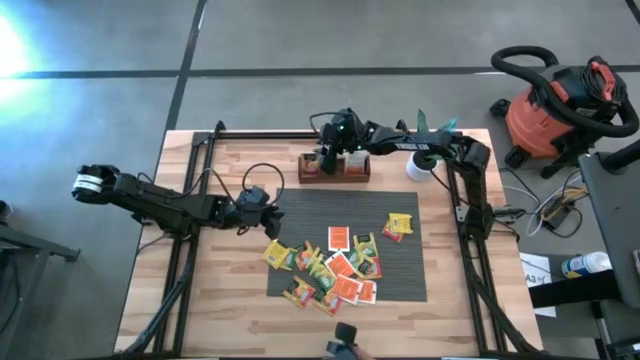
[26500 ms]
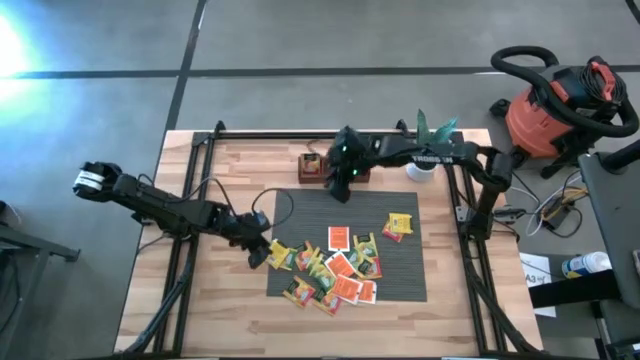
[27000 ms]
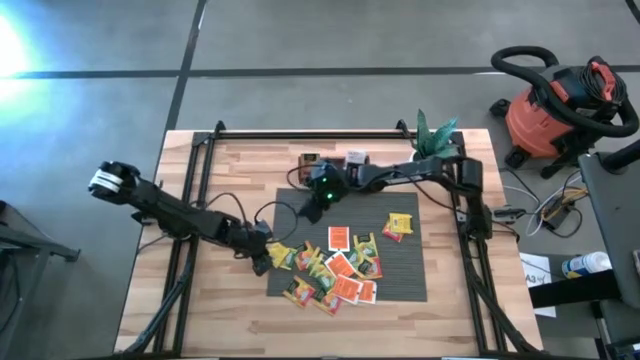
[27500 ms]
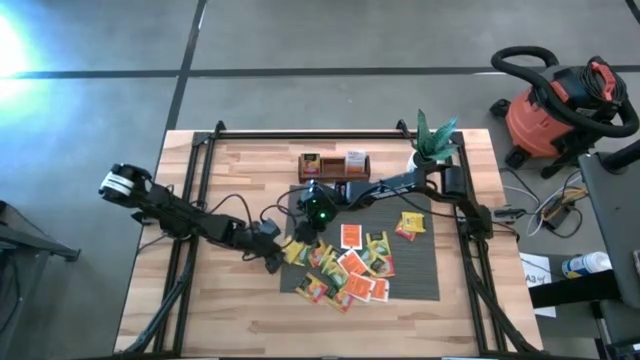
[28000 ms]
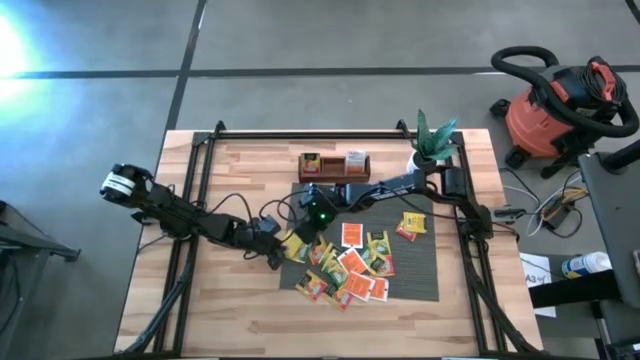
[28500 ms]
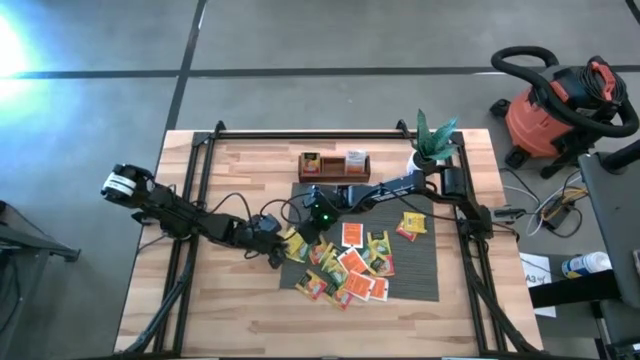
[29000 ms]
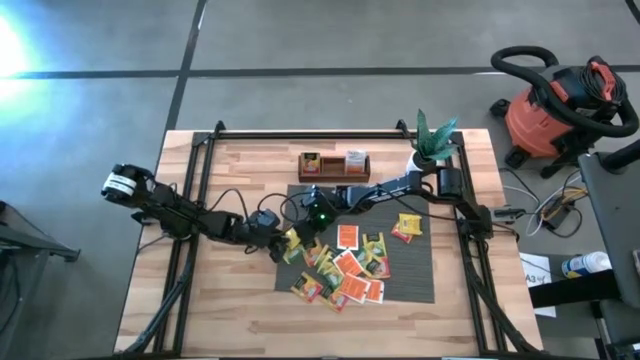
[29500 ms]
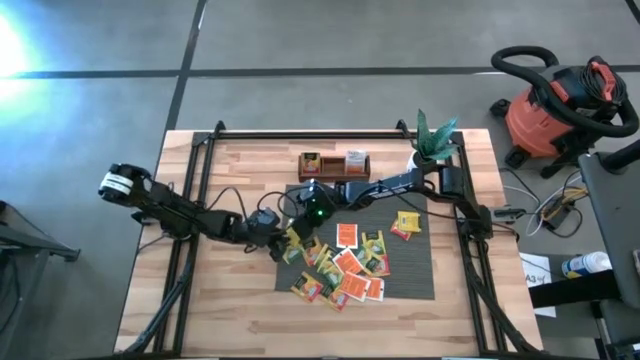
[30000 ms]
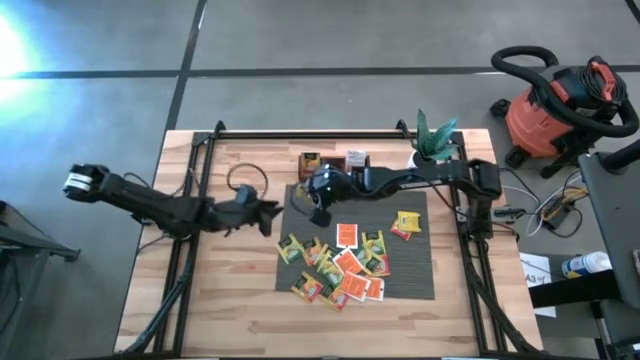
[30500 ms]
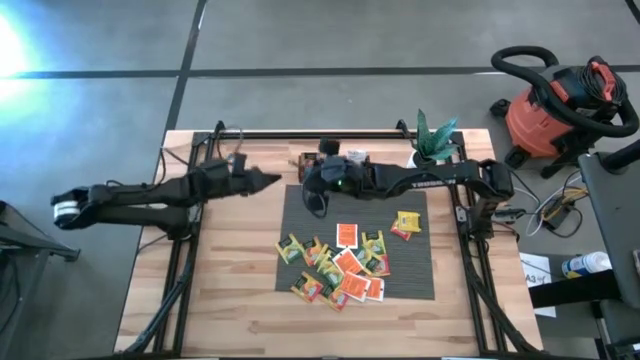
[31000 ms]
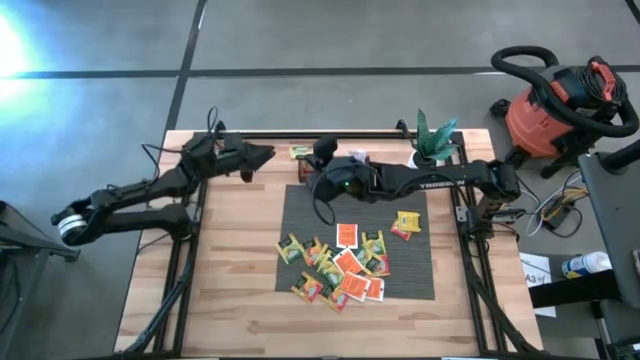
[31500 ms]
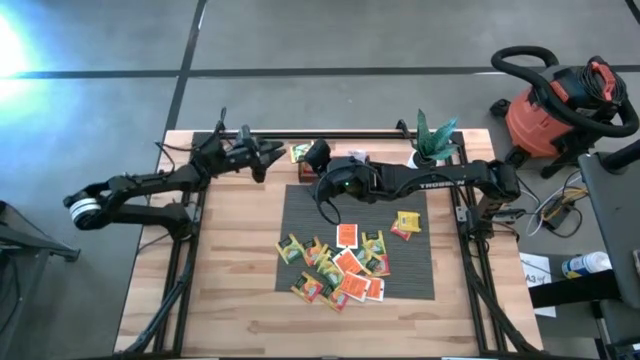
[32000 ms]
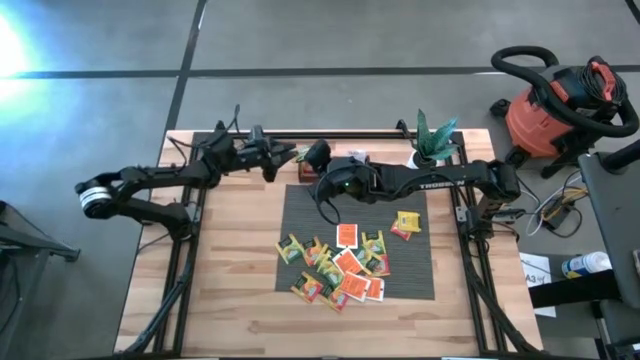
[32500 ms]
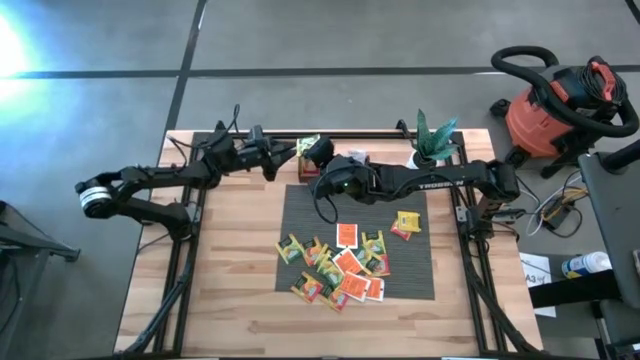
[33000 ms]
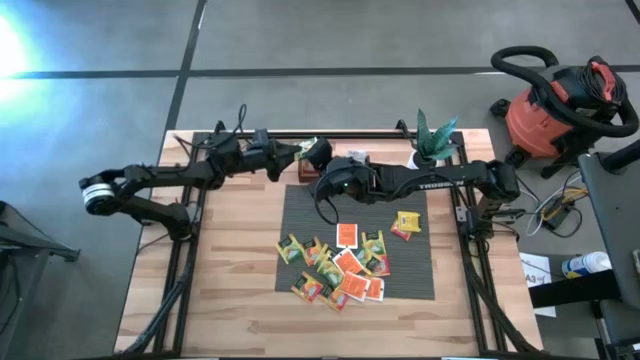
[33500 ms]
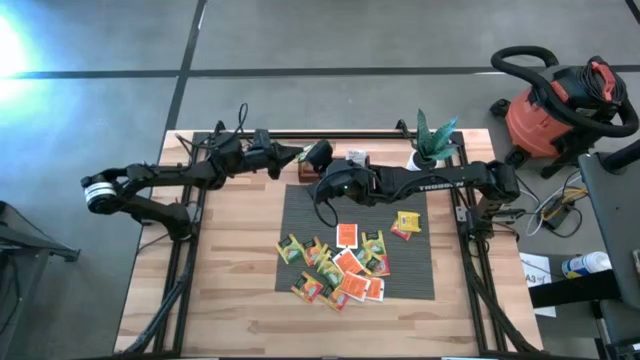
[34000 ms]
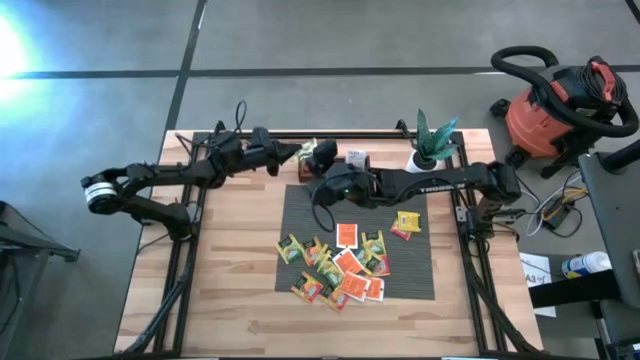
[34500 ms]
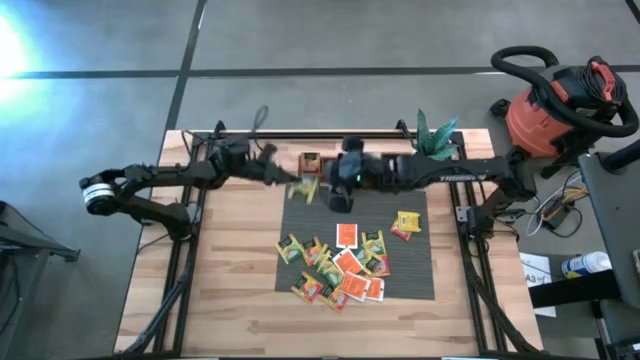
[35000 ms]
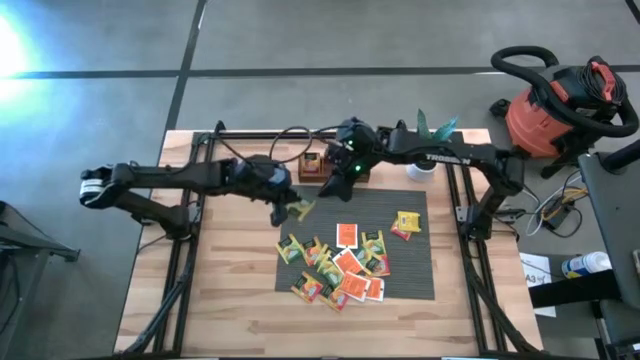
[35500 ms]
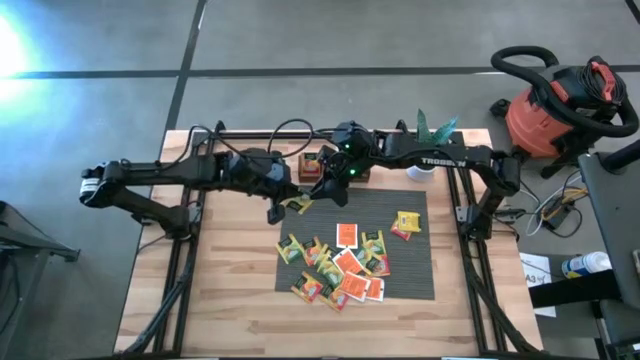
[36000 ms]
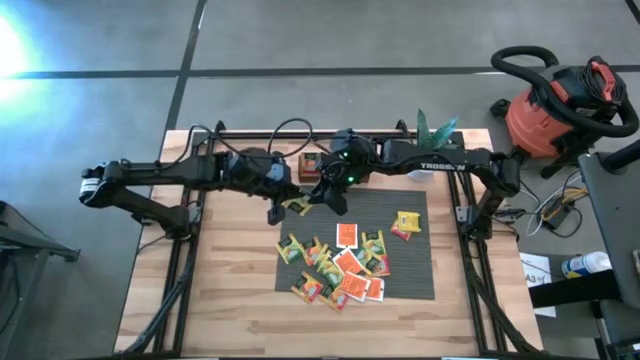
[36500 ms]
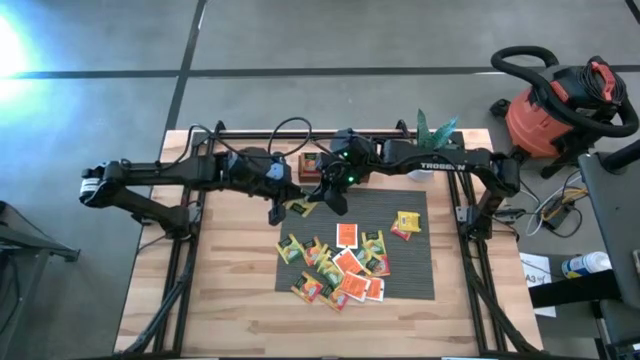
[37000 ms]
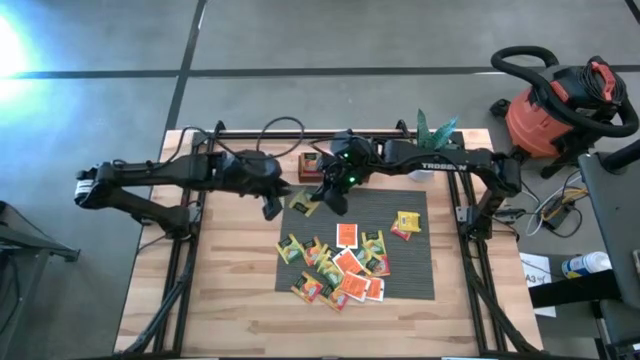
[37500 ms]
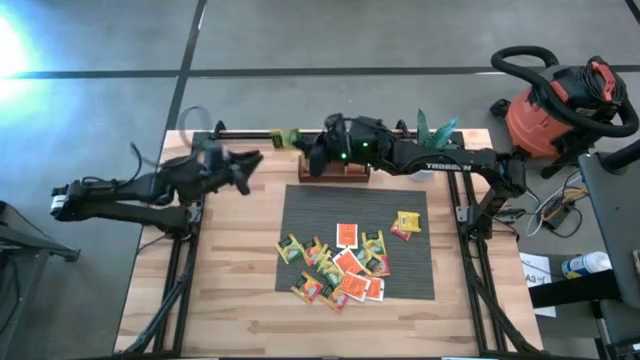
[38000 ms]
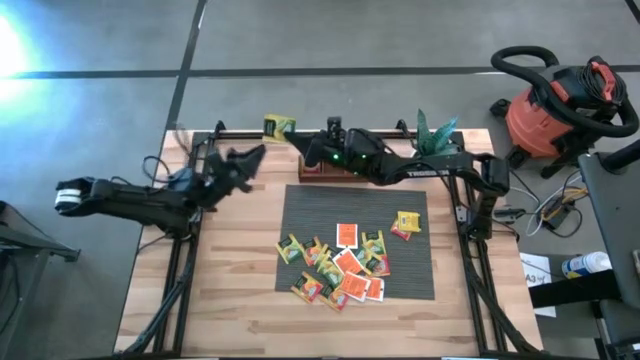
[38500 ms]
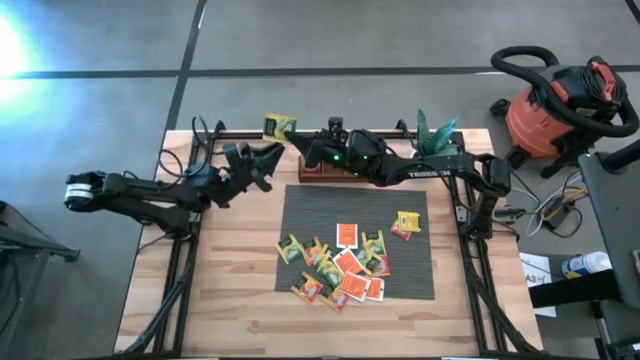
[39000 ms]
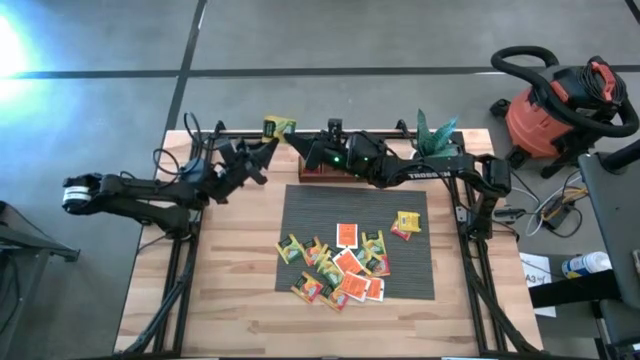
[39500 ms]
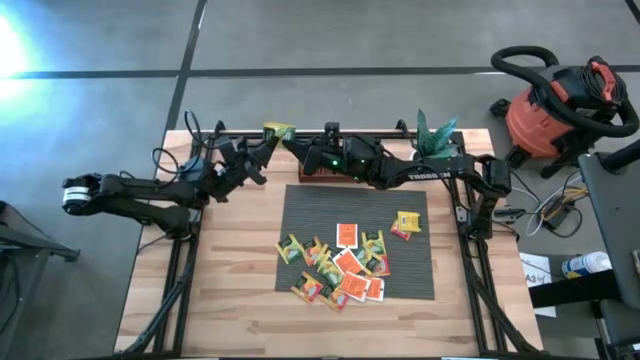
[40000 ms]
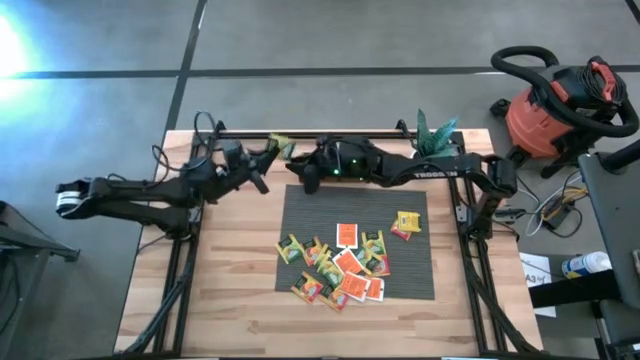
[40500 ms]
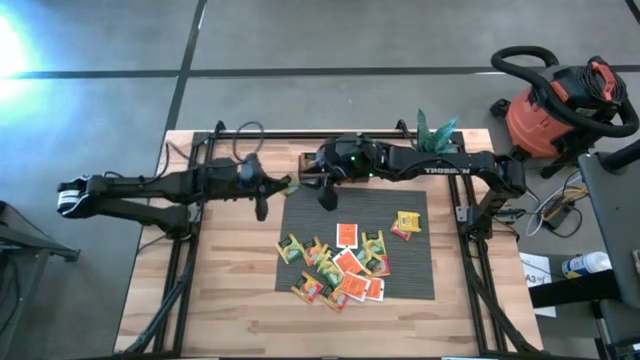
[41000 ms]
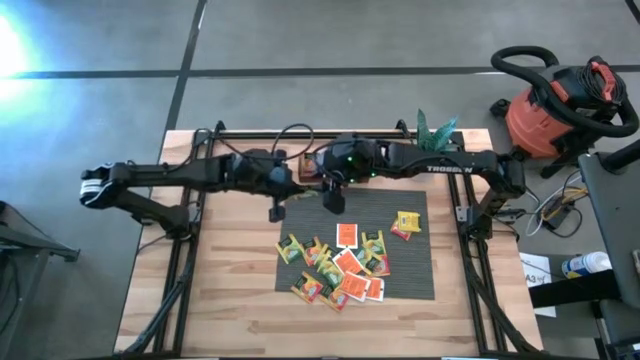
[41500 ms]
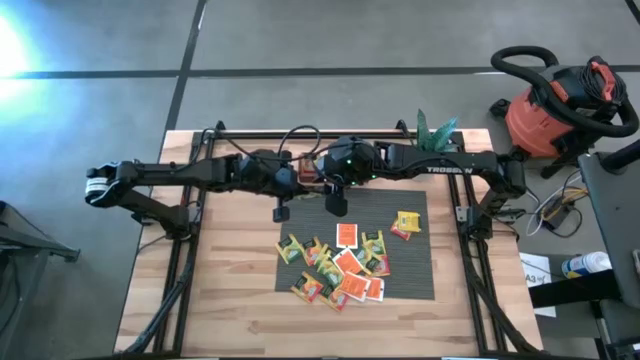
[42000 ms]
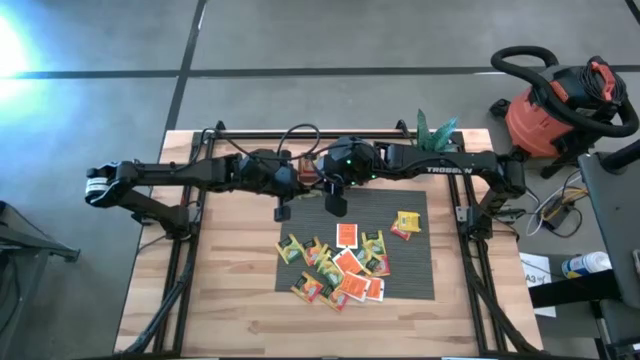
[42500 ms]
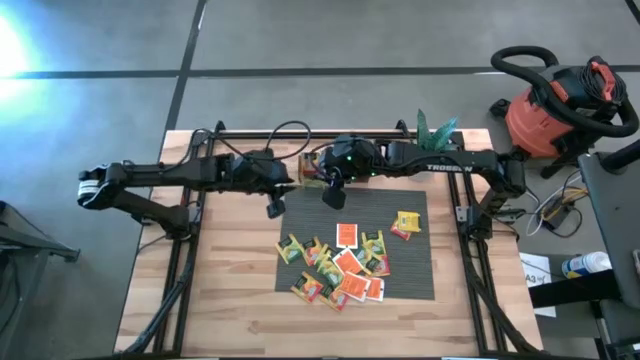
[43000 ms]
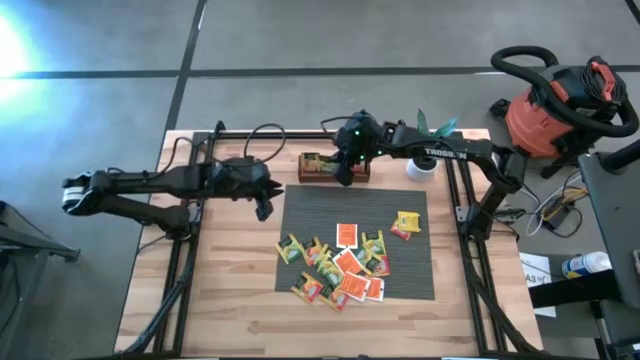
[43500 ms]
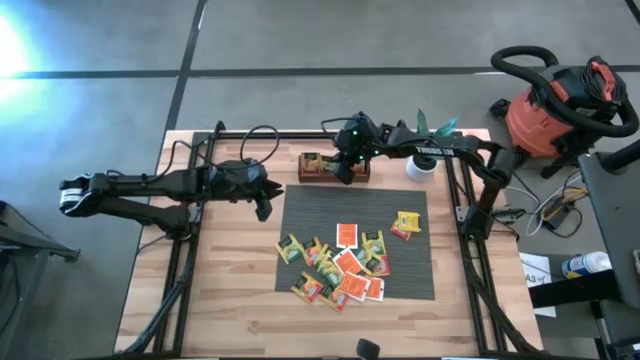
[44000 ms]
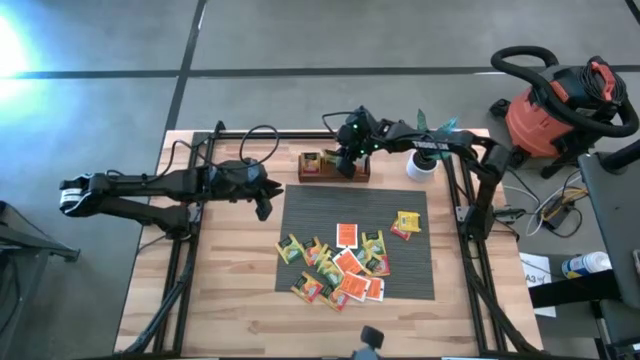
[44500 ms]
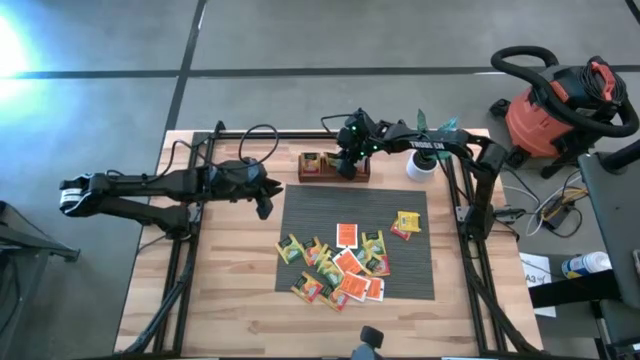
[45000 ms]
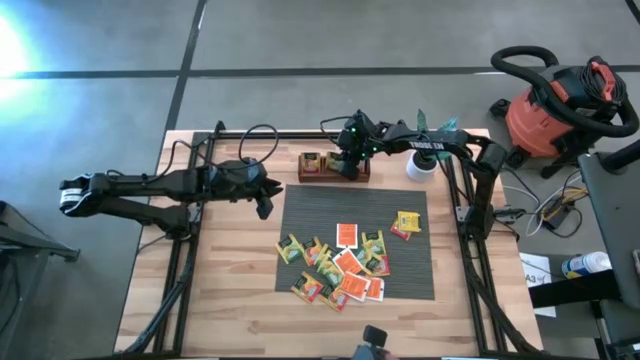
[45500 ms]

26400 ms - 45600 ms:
Task: Pick & Place Tea
Put the yellow tea bag into the middle section of the wooden organizer
